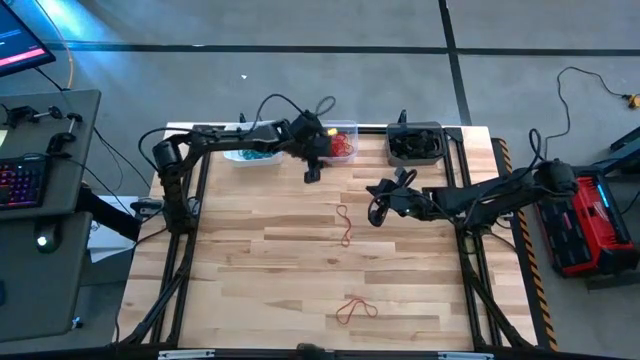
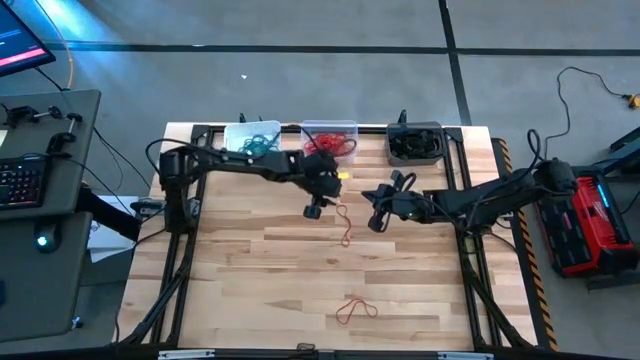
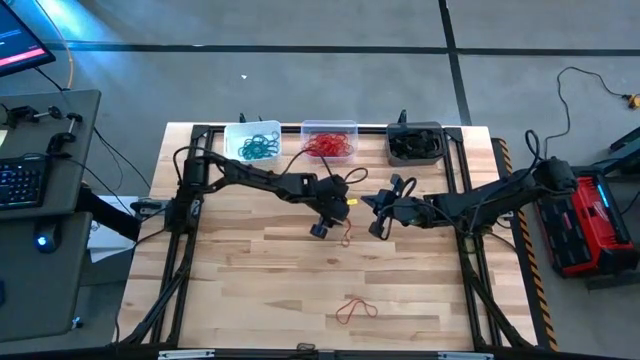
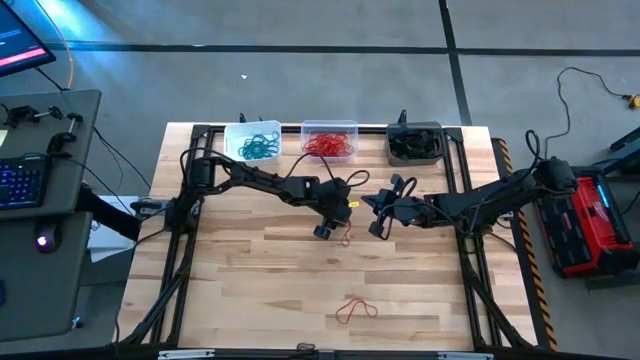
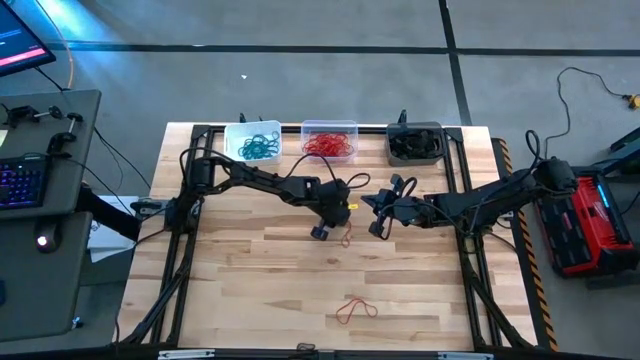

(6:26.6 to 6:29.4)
Task: Sort rubber bands into baskets
Put the red rubber band into the transparent bin

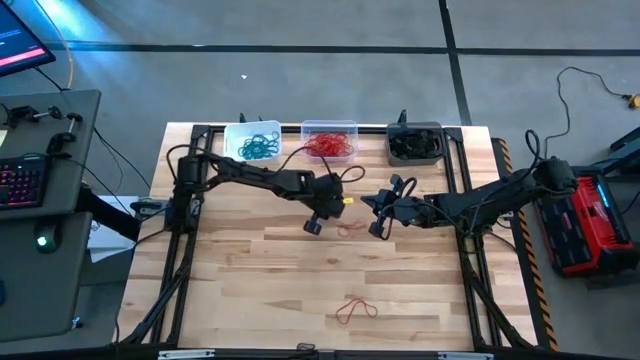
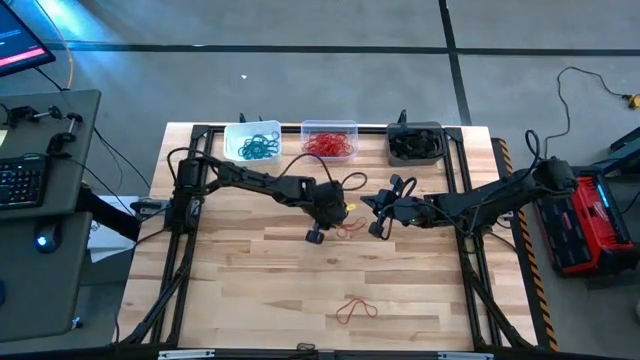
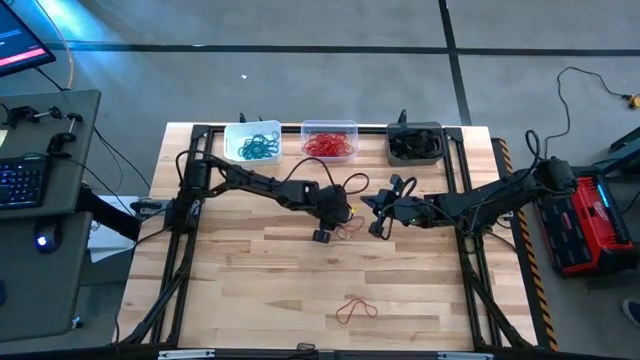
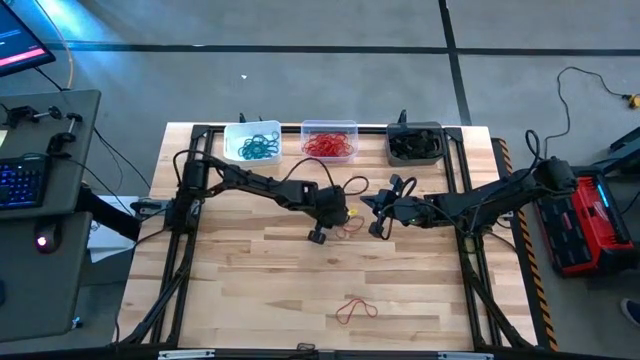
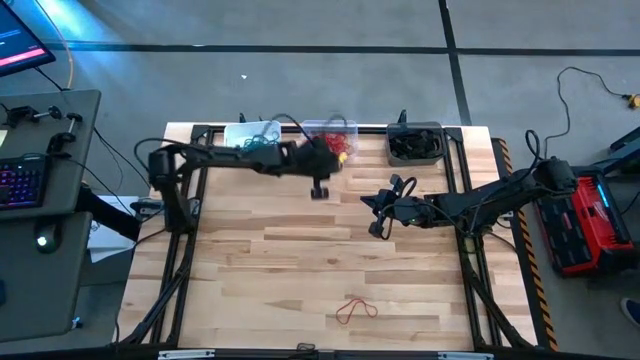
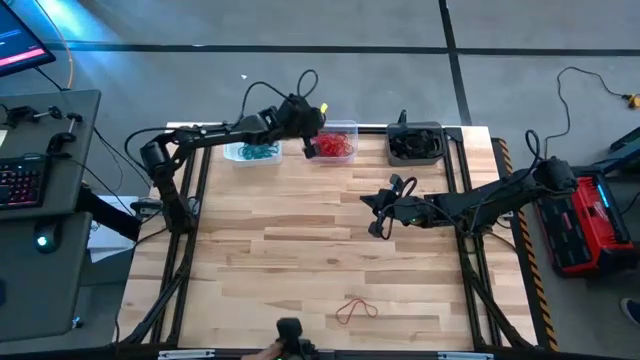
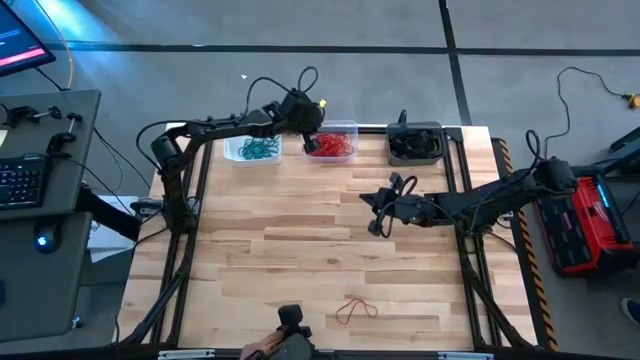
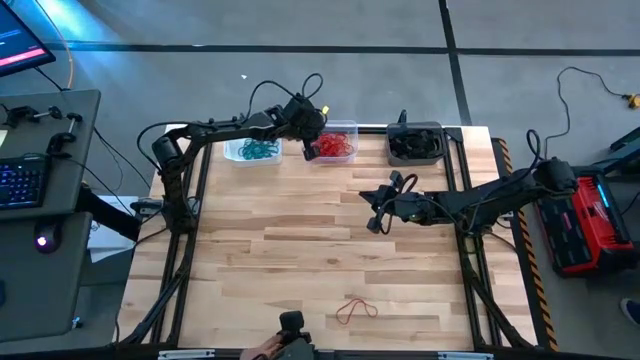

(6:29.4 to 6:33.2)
Put the red rubber band into the transparent bin

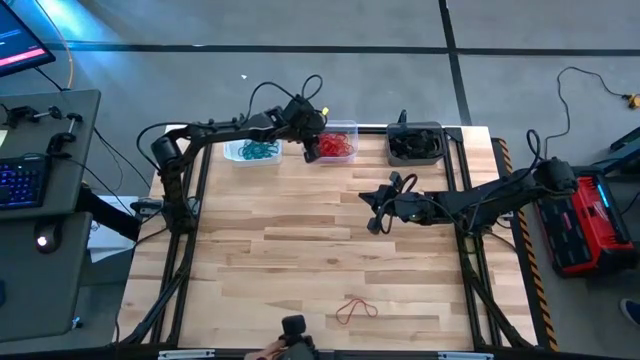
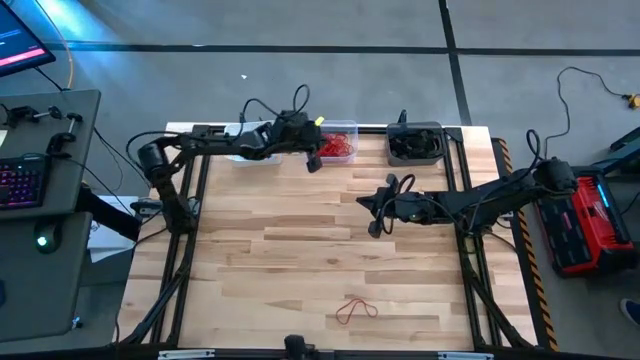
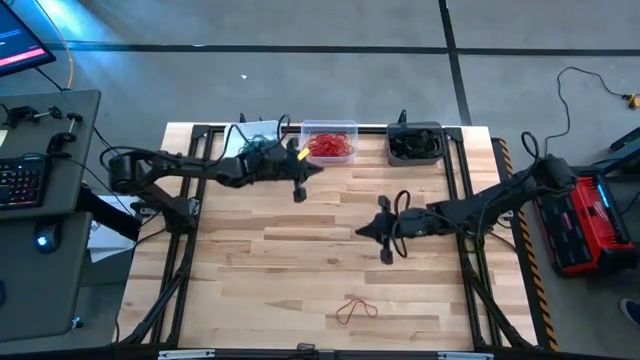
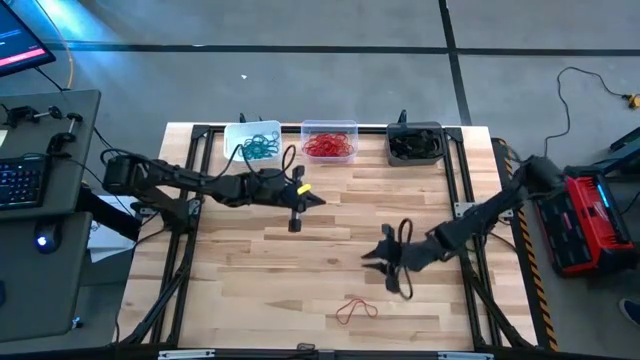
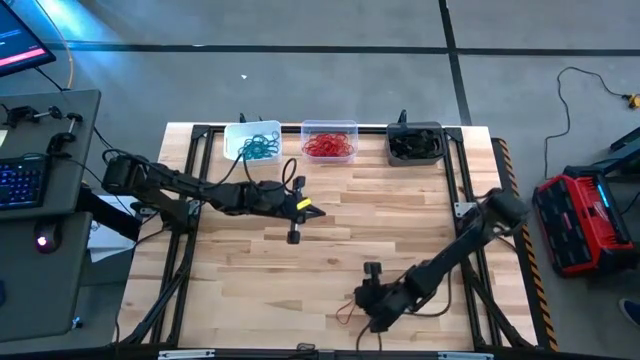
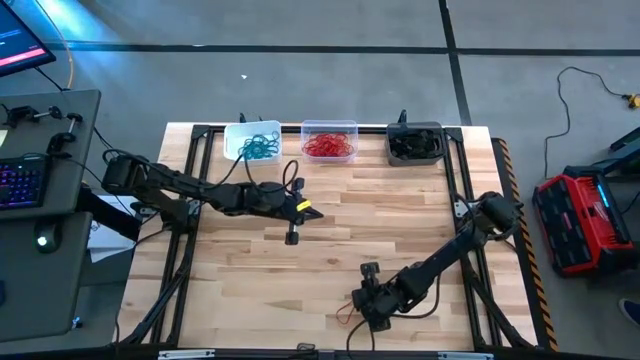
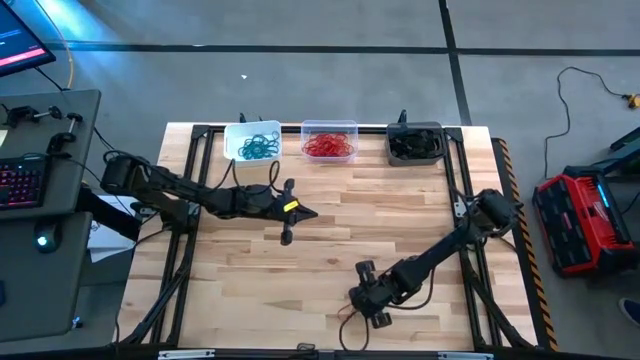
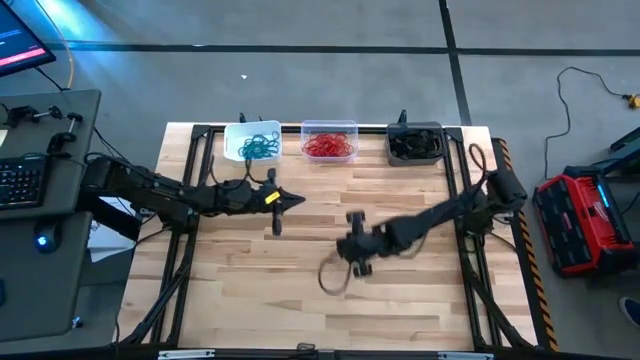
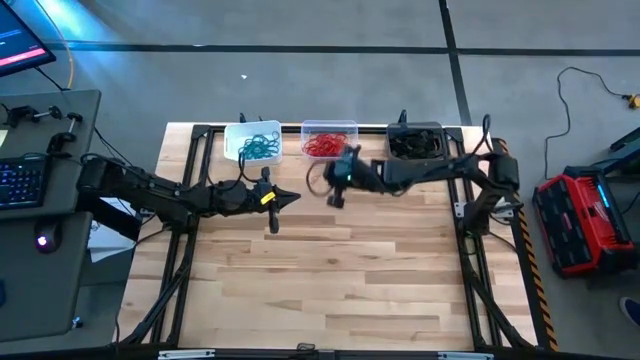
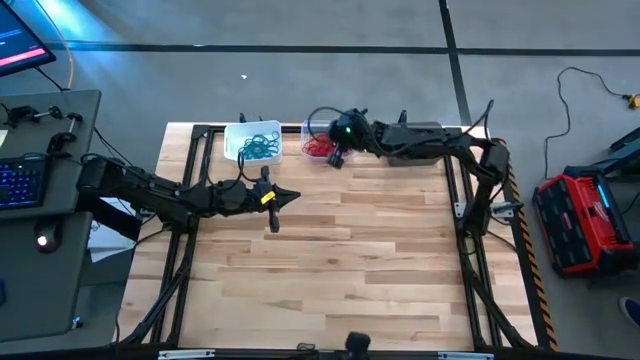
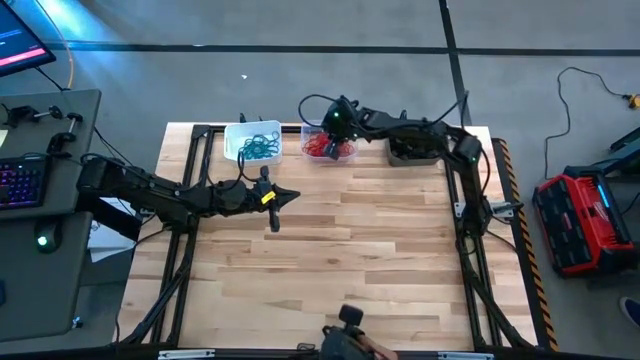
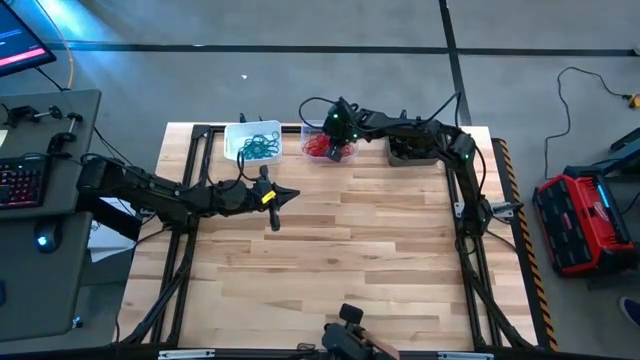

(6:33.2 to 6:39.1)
Put the red rubber band into the transparent bin

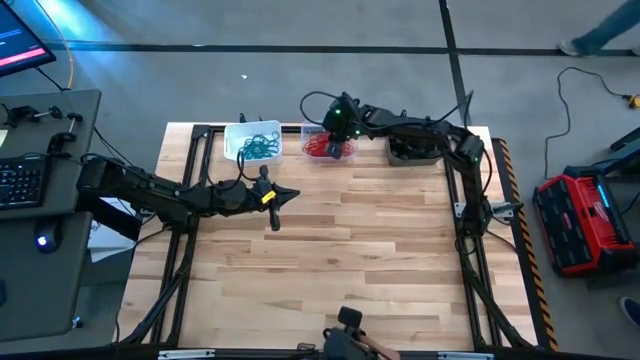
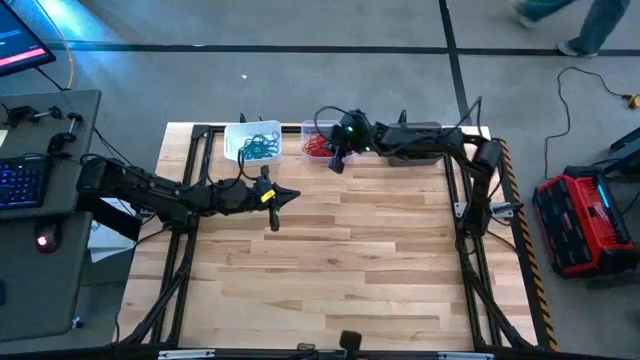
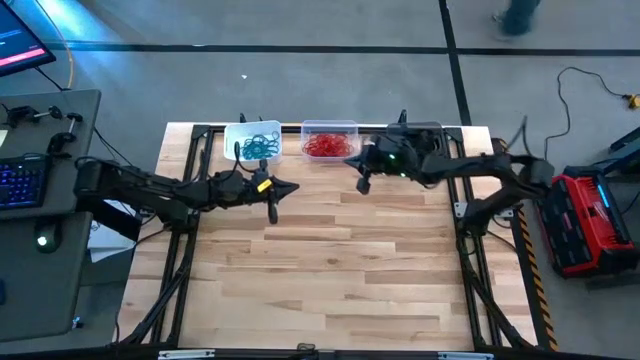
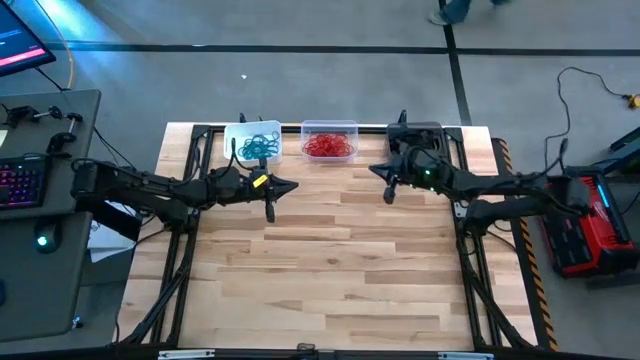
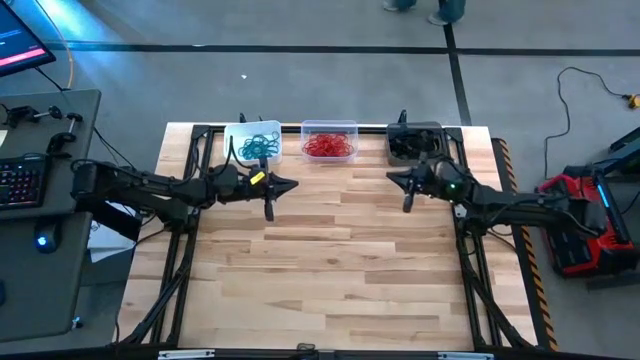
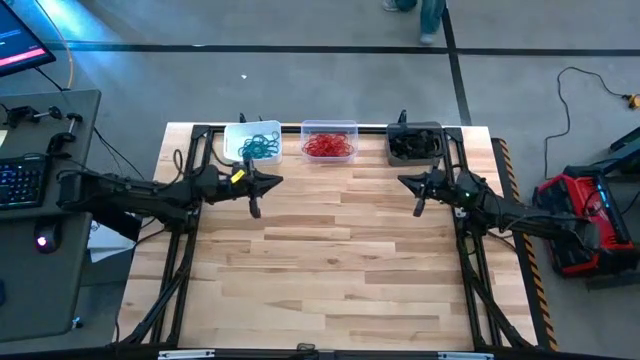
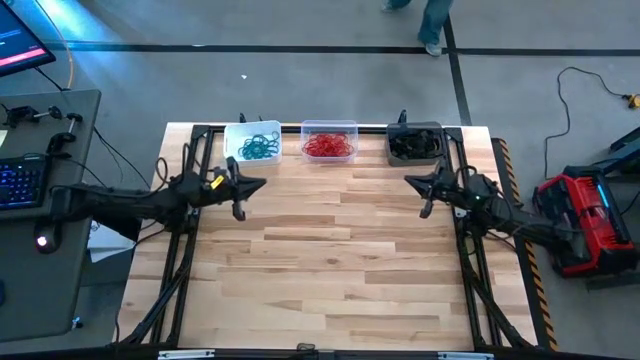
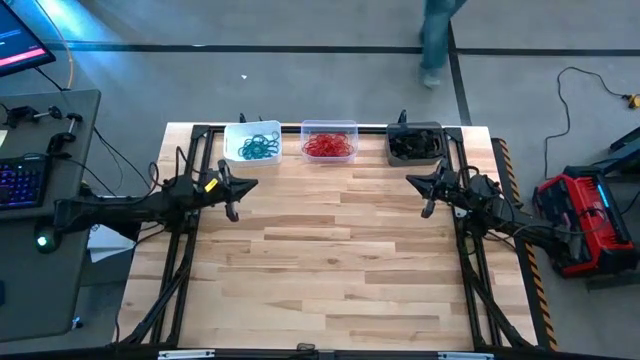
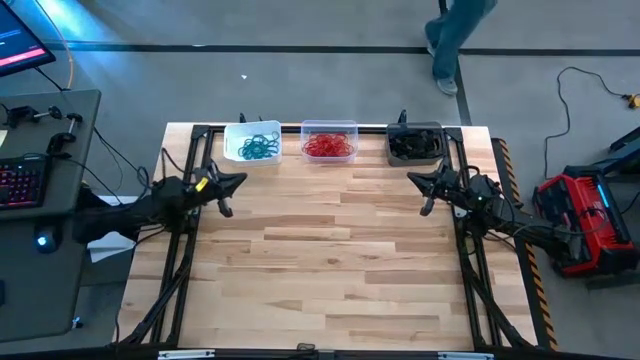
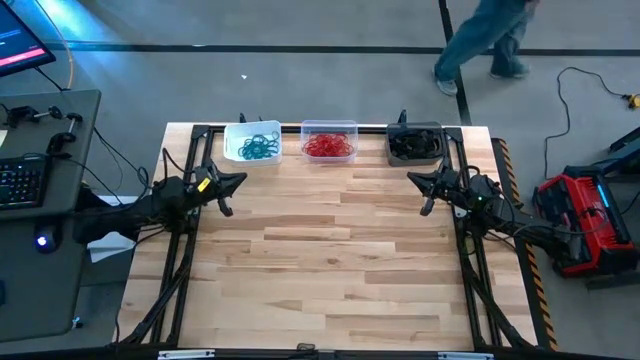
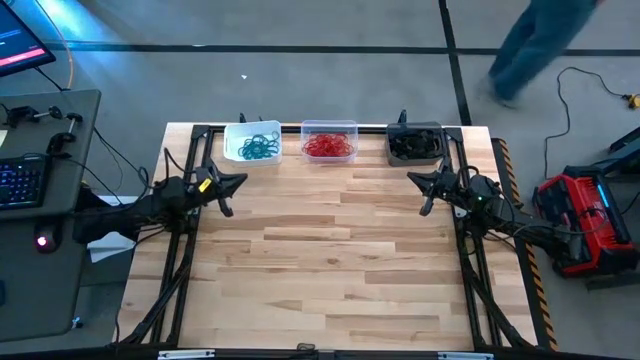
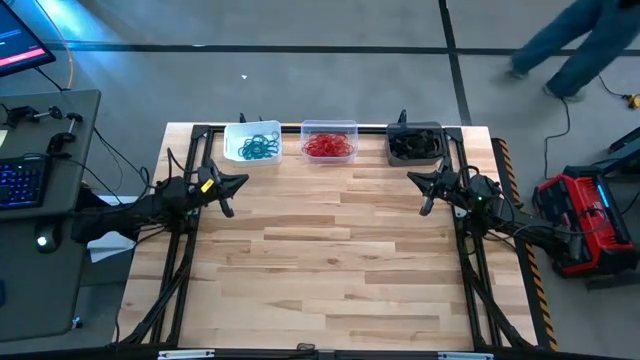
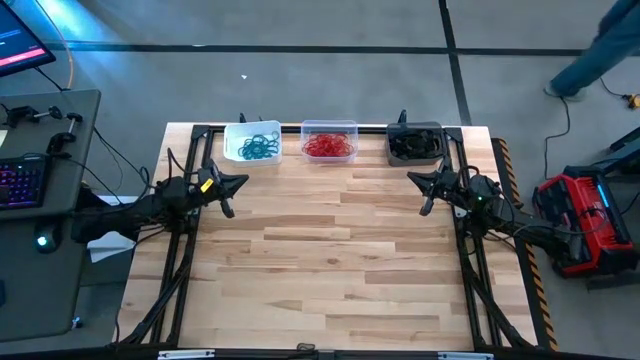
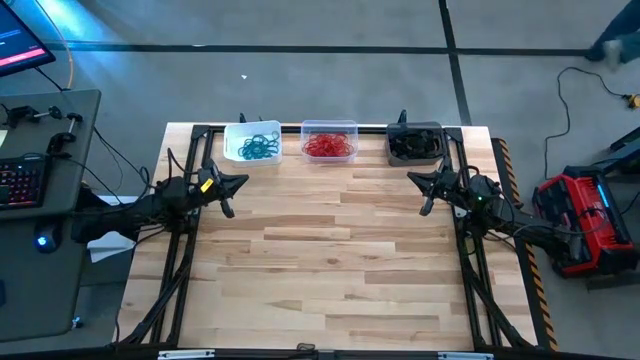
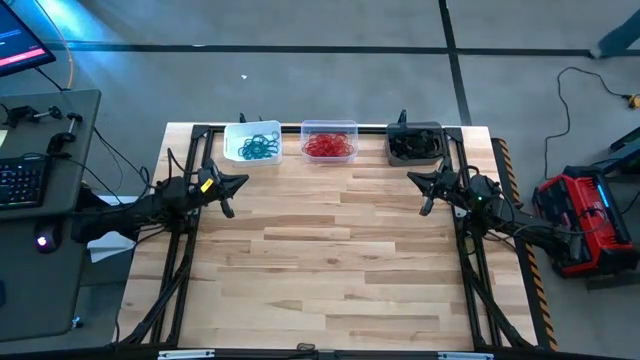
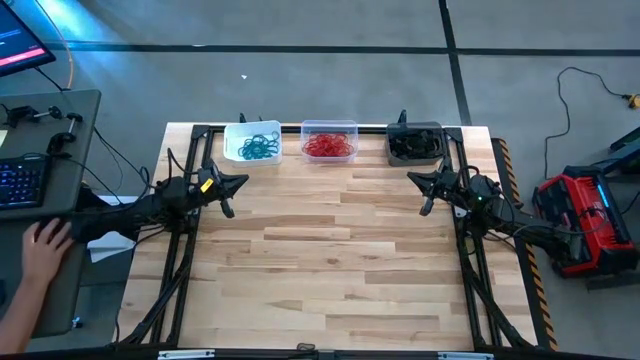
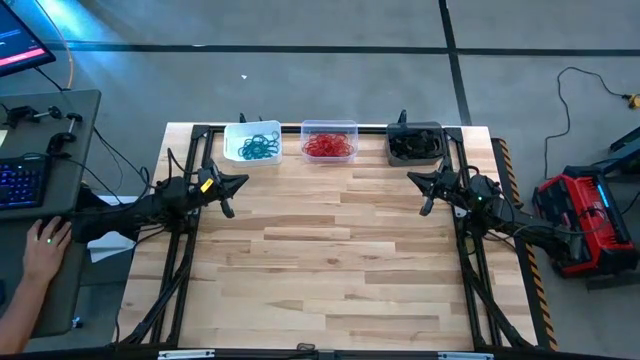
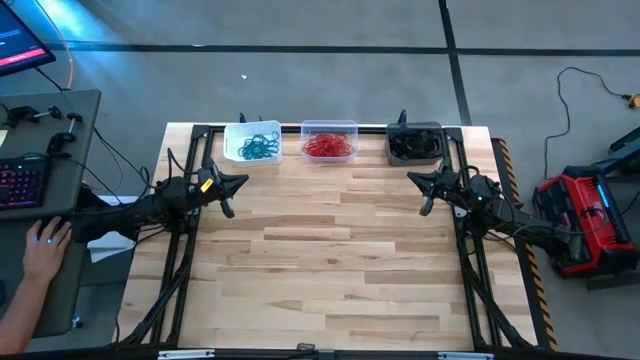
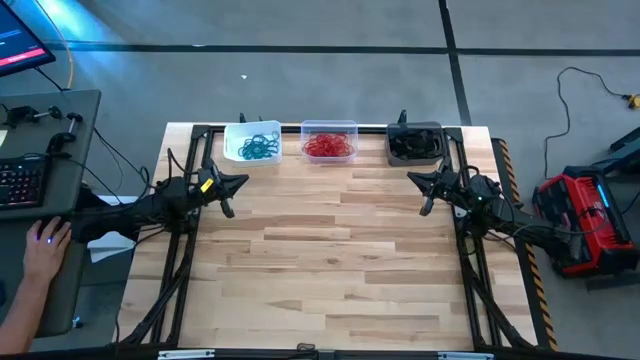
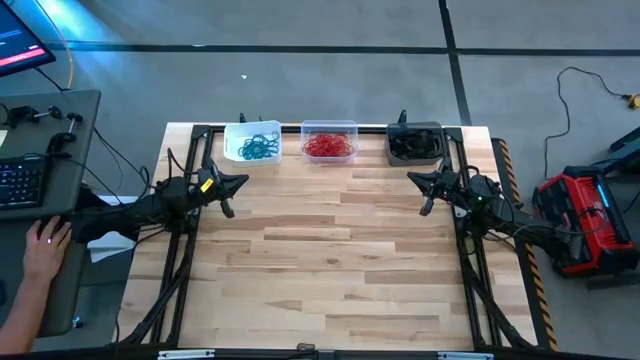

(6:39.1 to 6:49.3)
Return to Home Position
